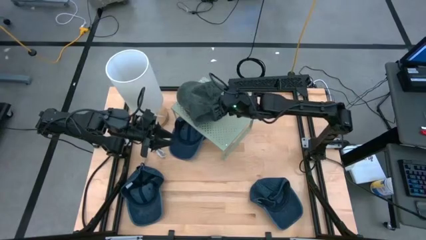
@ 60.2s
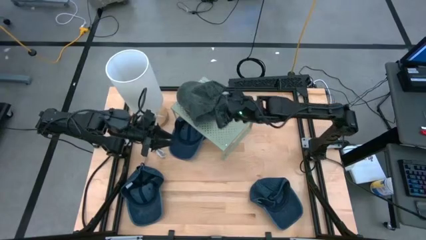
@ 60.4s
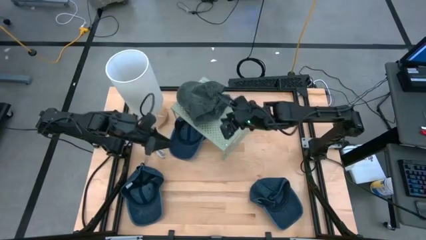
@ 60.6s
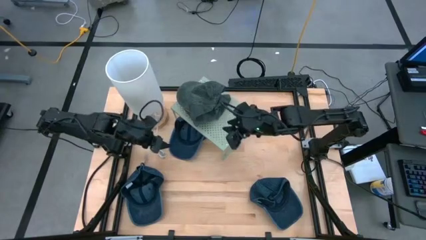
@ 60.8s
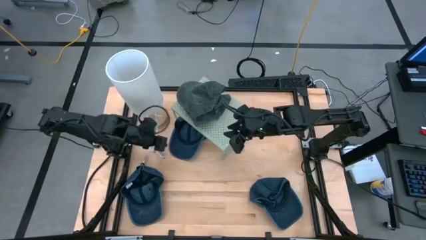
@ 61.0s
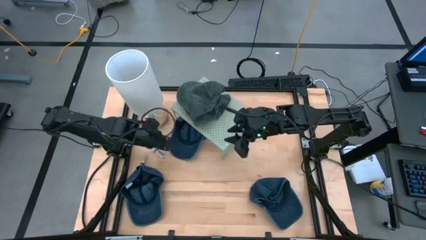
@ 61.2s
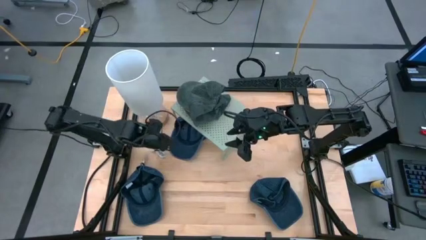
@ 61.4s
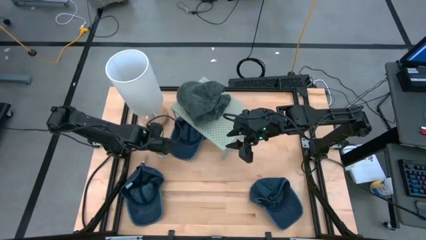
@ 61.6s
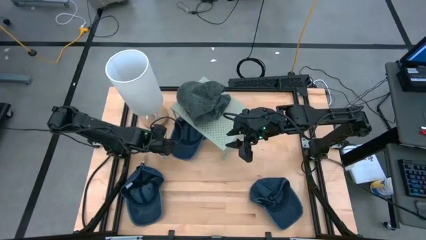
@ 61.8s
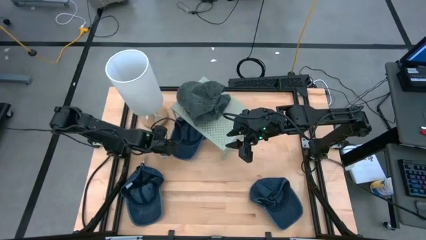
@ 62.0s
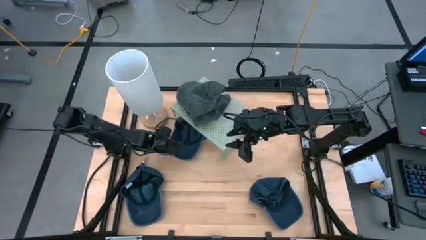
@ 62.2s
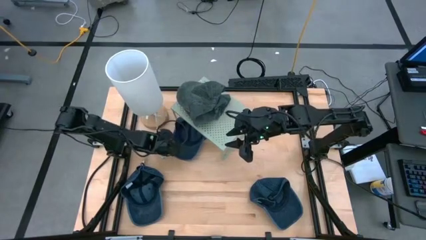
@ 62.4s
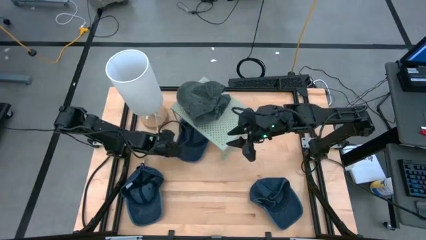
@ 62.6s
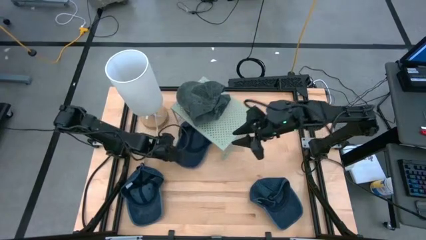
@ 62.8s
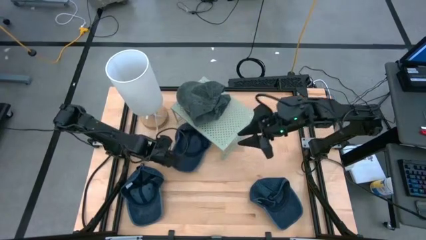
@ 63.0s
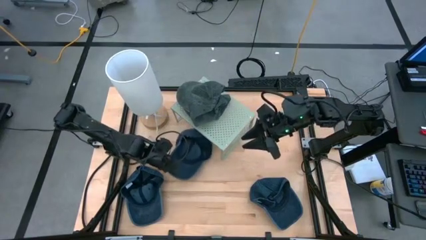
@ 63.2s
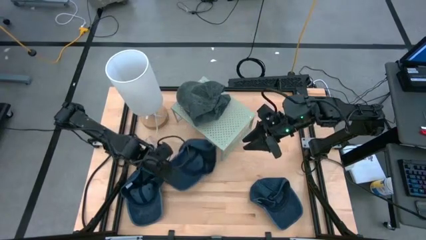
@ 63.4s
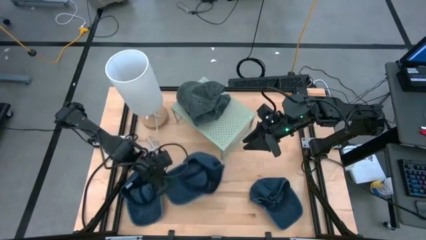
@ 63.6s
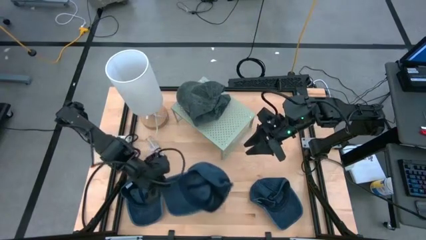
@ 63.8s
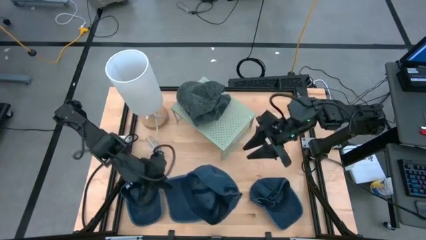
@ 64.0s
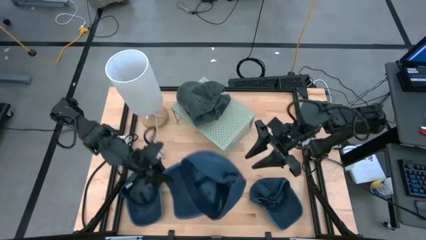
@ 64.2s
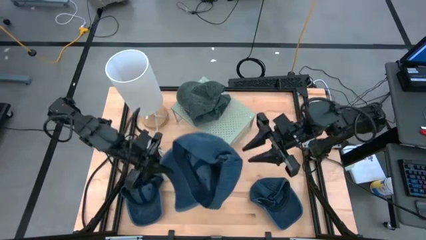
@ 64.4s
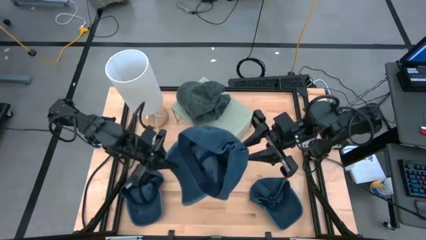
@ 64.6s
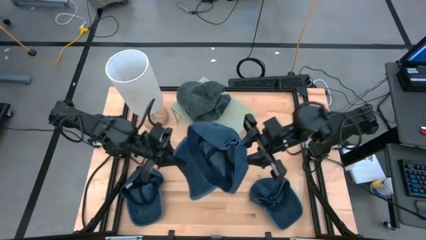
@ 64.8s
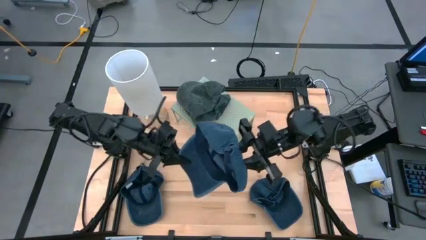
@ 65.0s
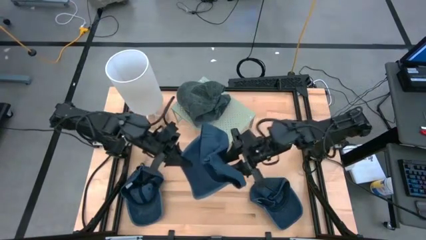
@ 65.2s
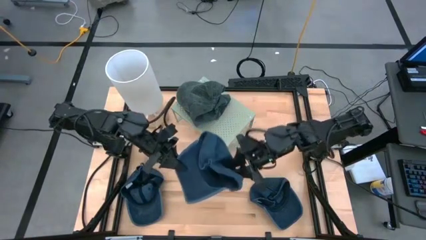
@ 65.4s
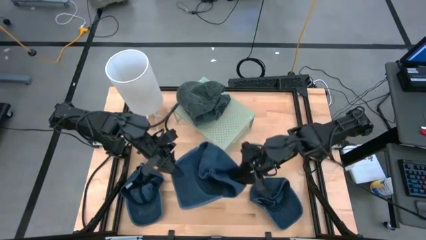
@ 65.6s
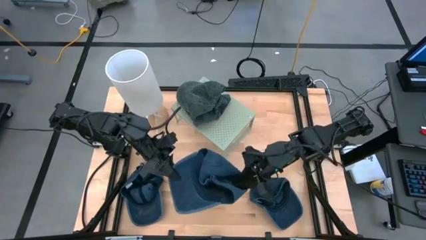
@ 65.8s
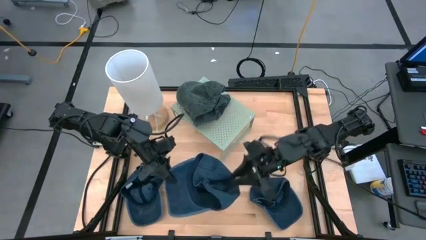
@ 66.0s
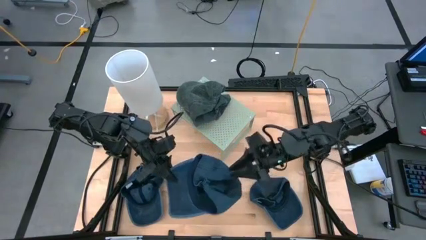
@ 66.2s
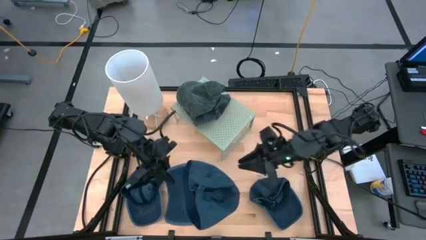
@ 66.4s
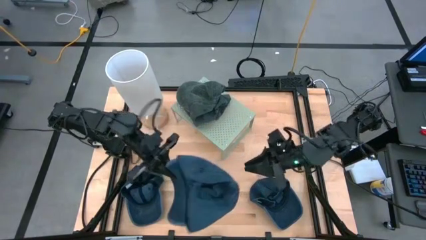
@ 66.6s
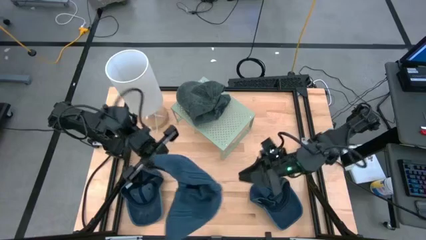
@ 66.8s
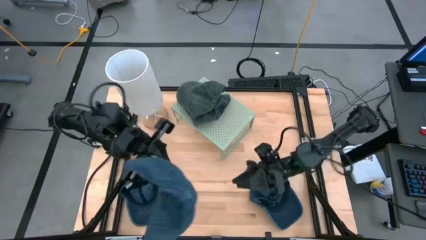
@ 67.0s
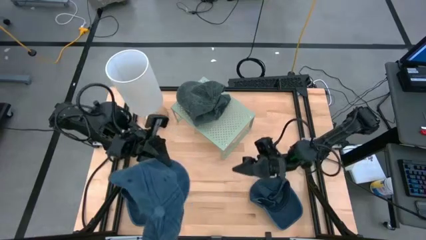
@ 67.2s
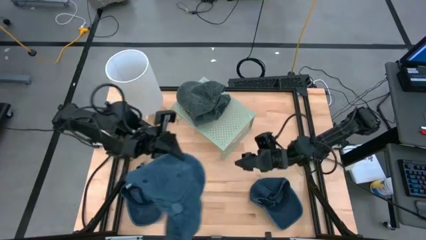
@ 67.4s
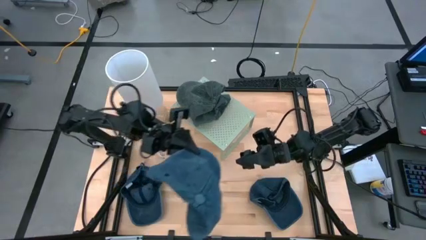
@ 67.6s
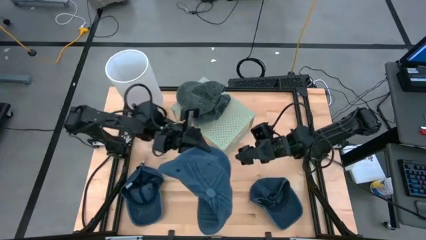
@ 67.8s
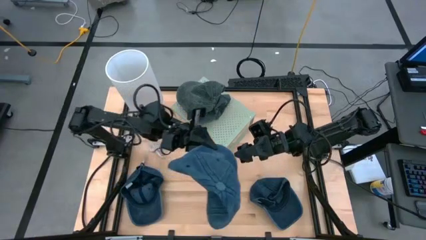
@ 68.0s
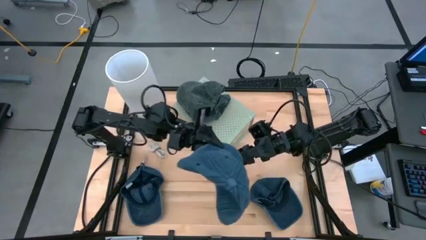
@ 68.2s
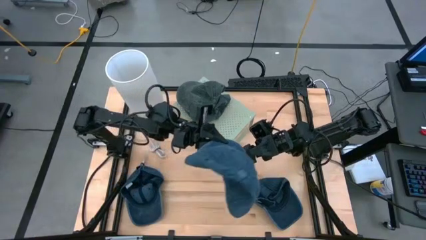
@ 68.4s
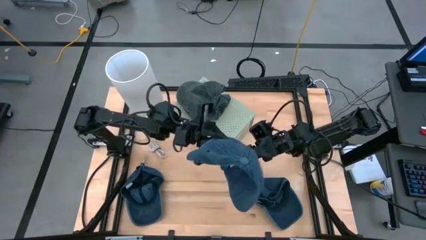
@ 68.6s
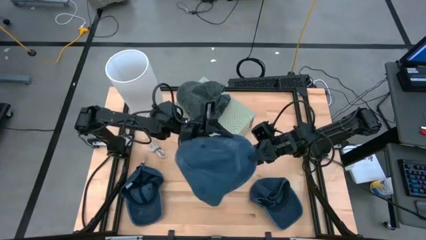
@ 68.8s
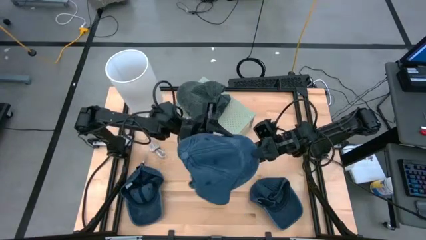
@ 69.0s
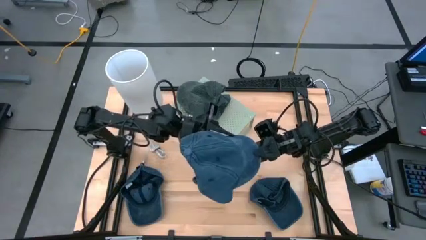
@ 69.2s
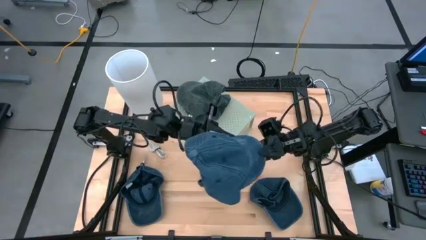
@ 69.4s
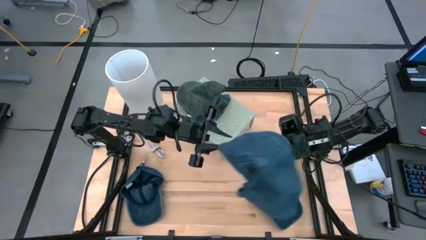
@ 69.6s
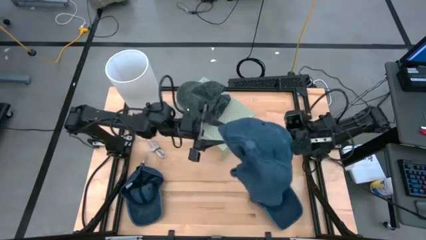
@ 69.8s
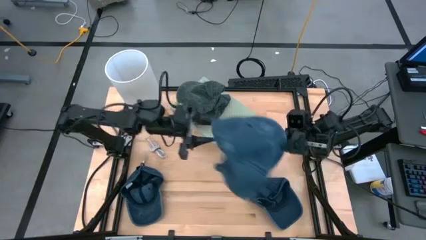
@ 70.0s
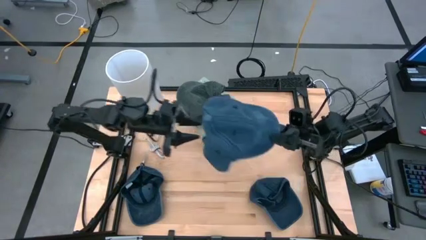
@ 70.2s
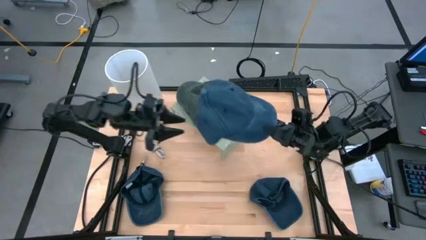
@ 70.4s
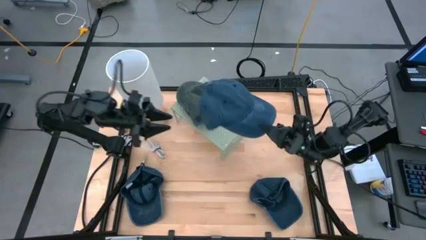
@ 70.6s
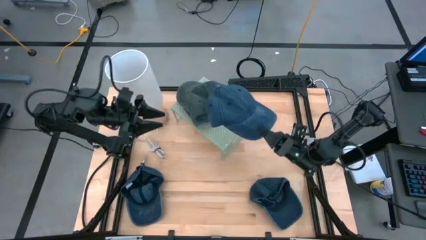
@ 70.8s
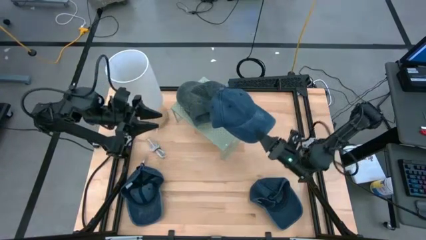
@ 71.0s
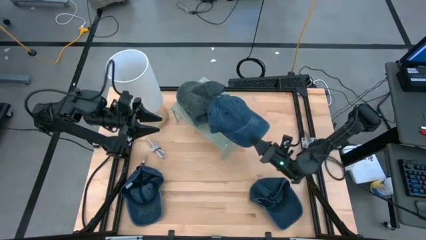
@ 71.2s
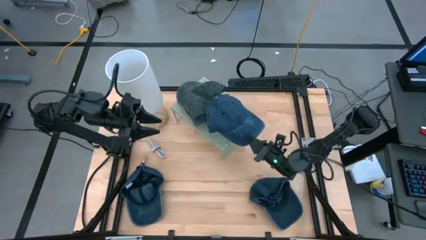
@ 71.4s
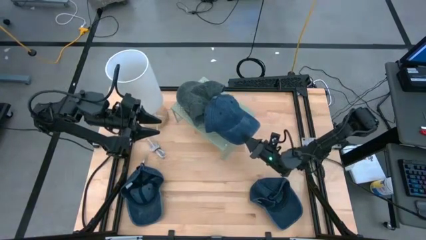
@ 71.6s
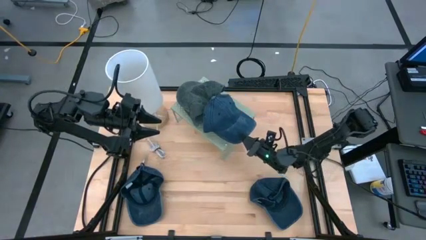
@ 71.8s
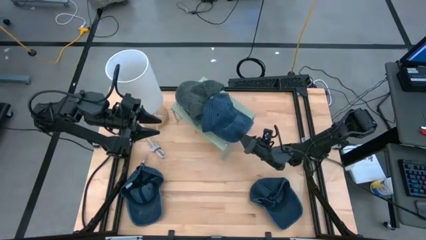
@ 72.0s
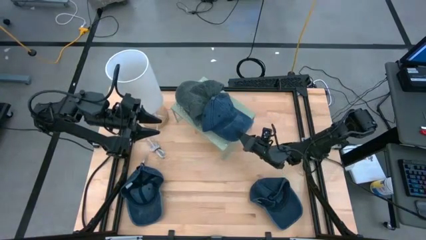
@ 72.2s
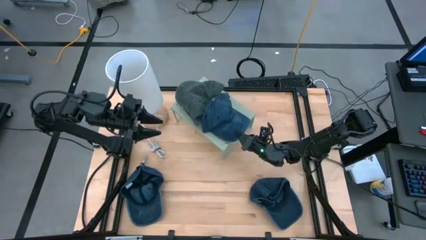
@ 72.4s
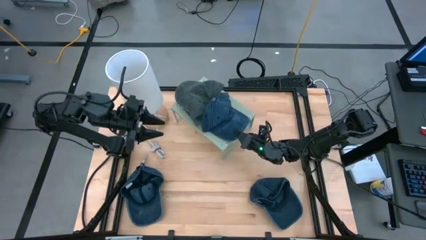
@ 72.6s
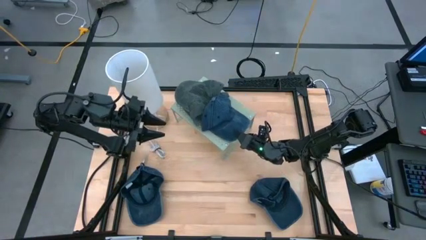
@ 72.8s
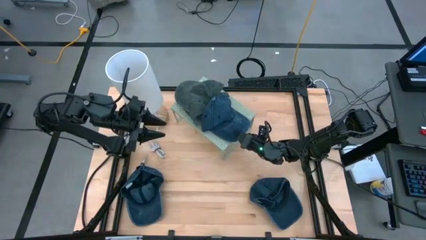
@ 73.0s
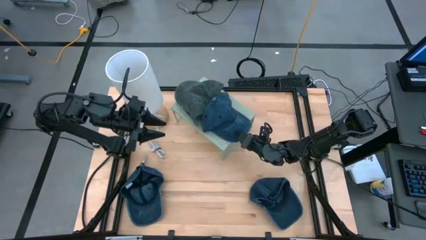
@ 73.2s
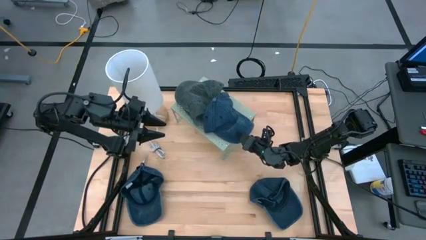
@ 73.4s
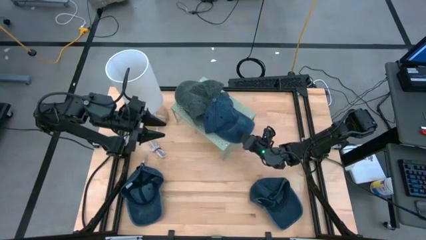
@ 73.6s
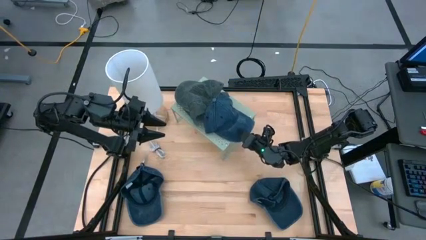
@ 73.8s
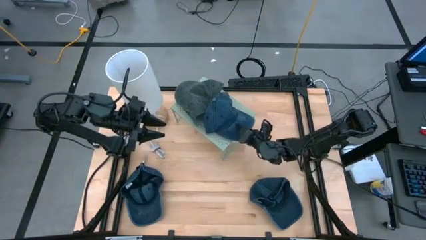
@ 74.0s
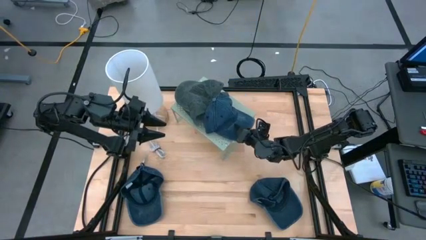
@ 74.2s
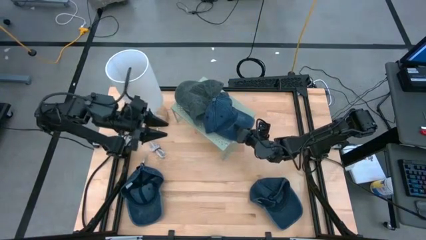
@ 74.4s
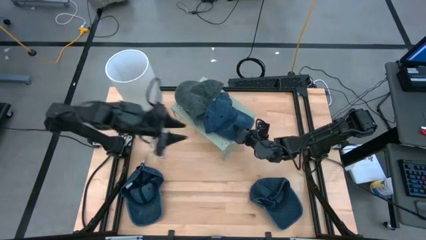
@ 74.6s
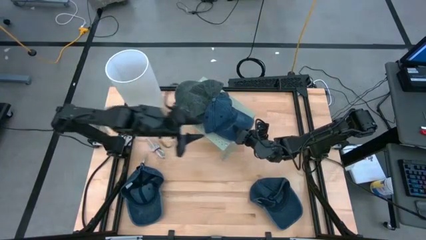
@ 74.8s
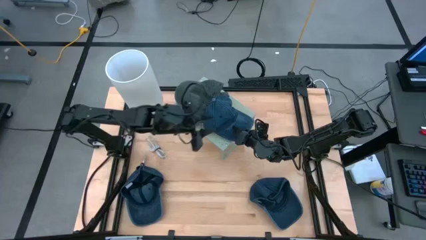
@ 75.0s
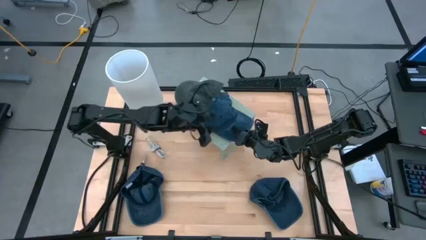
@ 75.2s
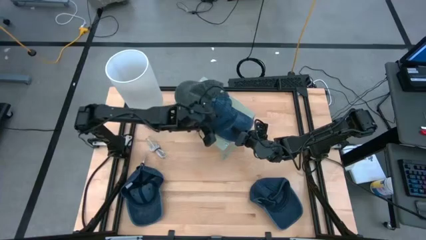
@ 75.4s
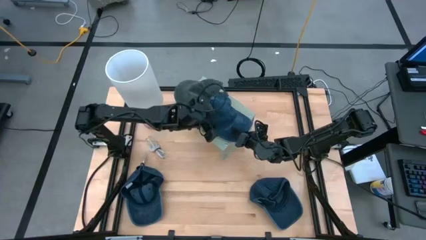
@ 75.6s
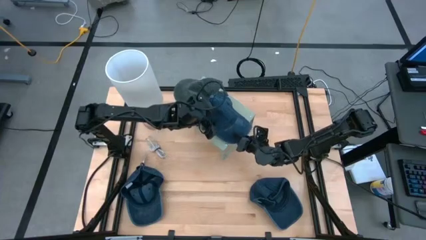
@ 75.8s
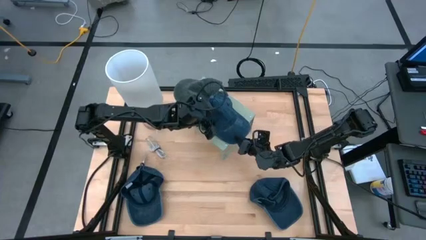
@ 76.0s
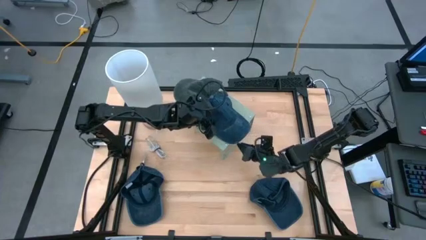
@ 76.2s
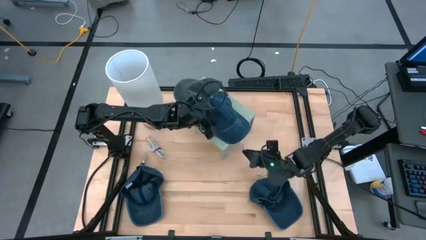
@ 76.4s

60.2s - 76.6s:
Task: Pick & Place hat
Put the top blue cap on the shelf
